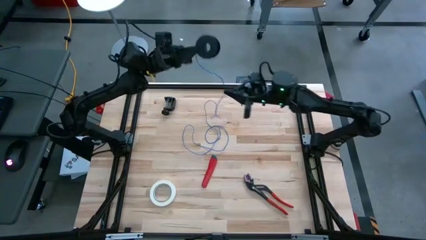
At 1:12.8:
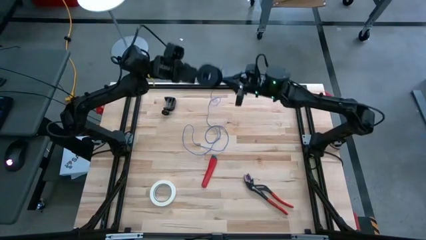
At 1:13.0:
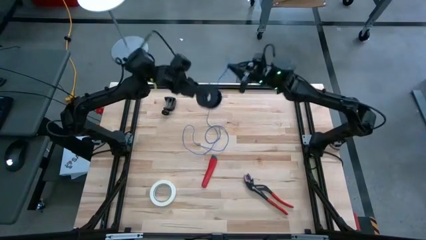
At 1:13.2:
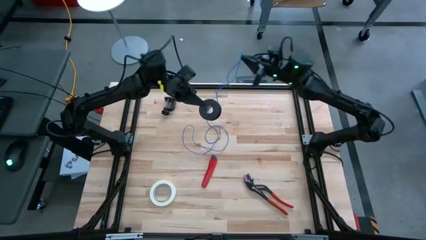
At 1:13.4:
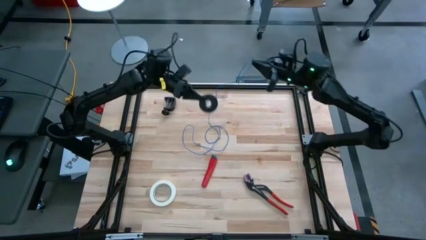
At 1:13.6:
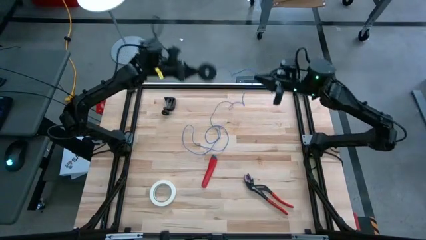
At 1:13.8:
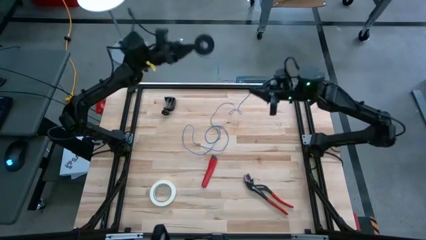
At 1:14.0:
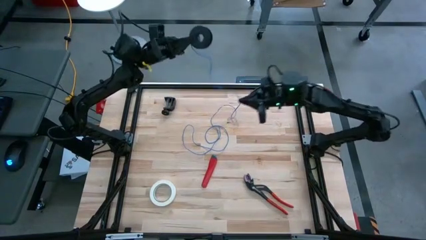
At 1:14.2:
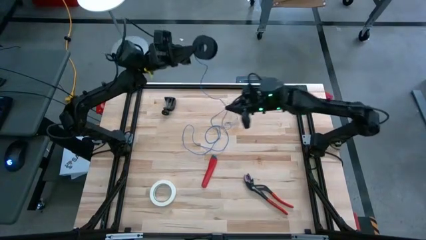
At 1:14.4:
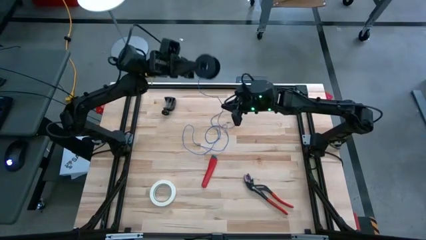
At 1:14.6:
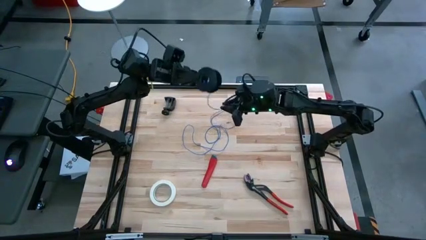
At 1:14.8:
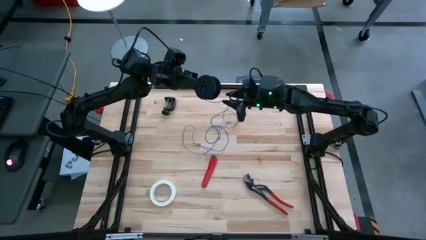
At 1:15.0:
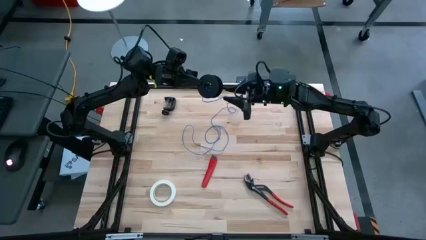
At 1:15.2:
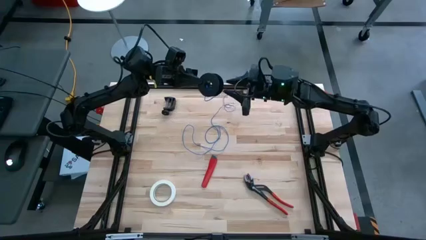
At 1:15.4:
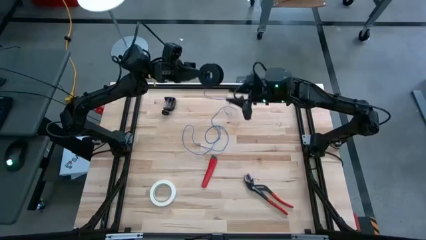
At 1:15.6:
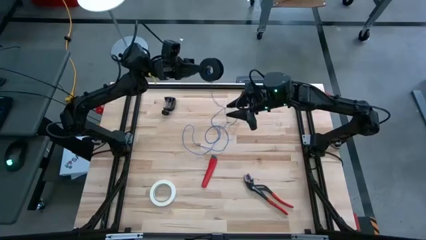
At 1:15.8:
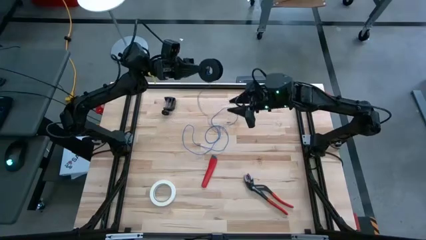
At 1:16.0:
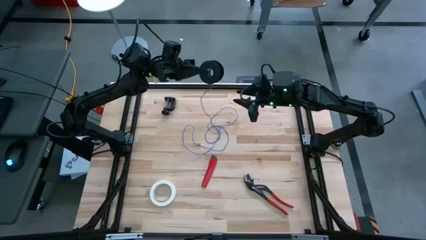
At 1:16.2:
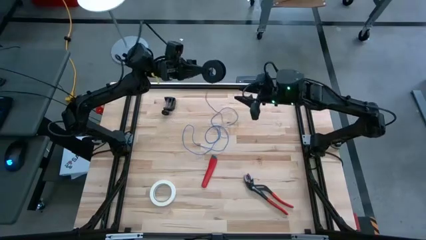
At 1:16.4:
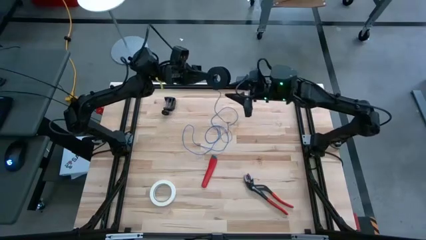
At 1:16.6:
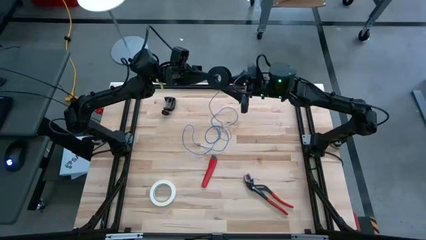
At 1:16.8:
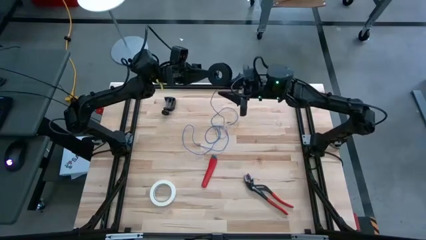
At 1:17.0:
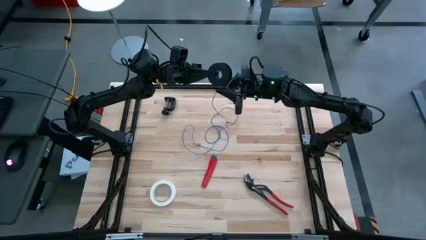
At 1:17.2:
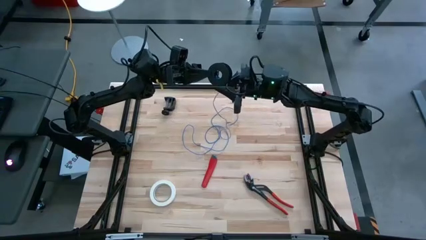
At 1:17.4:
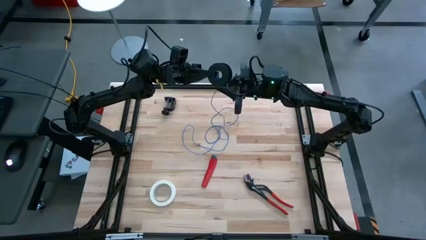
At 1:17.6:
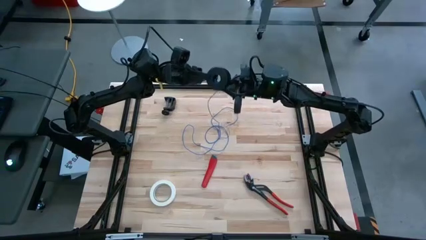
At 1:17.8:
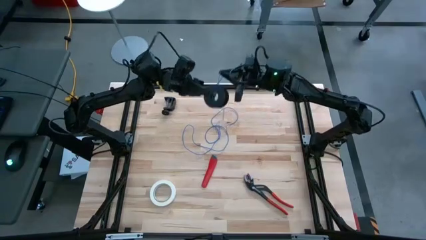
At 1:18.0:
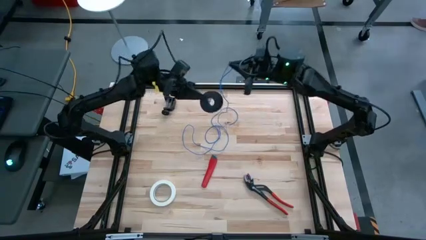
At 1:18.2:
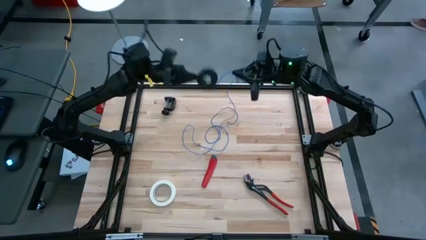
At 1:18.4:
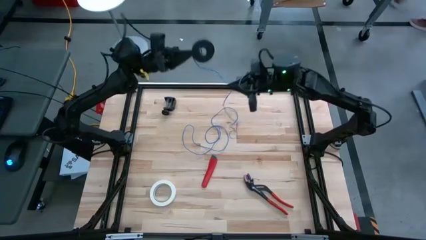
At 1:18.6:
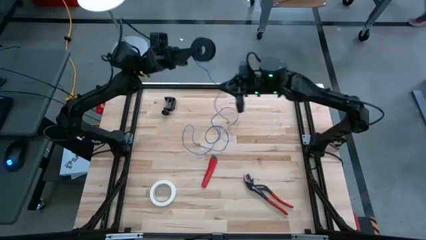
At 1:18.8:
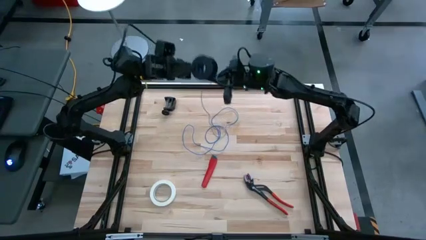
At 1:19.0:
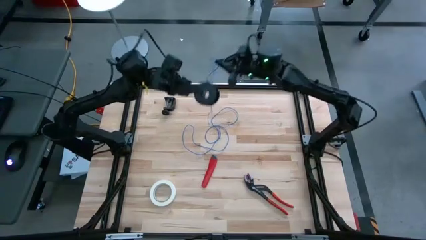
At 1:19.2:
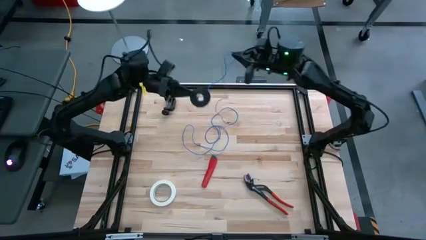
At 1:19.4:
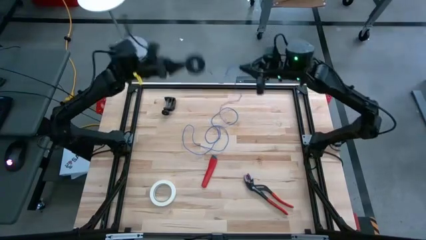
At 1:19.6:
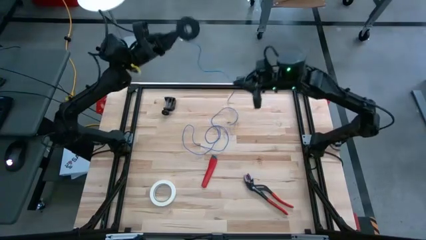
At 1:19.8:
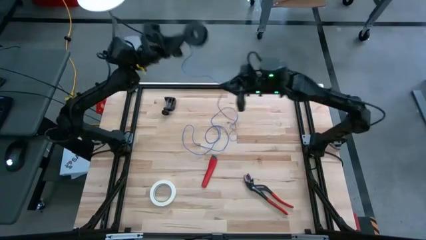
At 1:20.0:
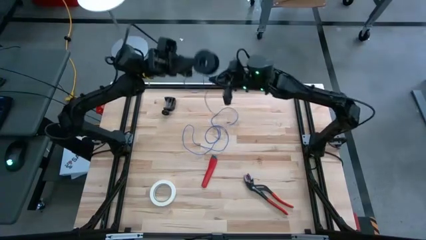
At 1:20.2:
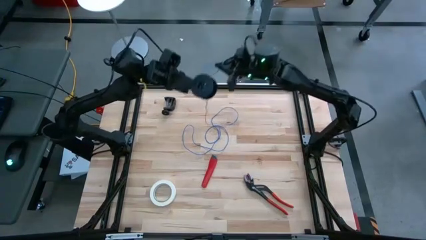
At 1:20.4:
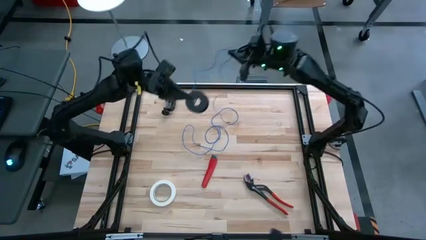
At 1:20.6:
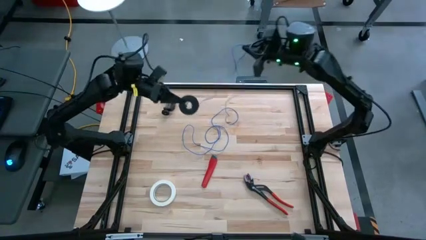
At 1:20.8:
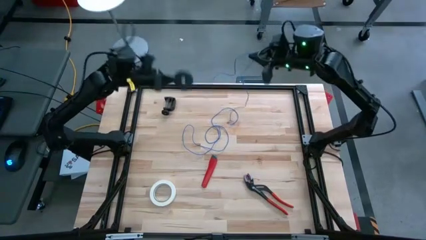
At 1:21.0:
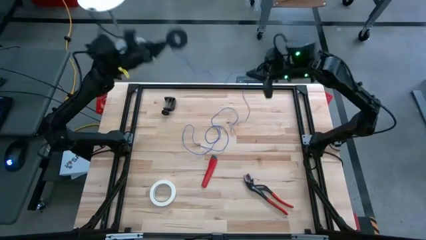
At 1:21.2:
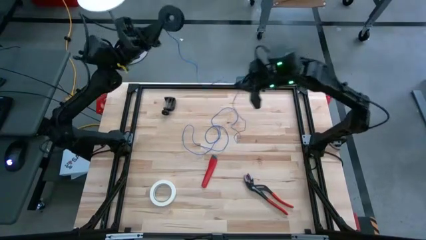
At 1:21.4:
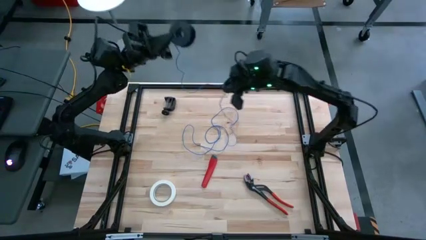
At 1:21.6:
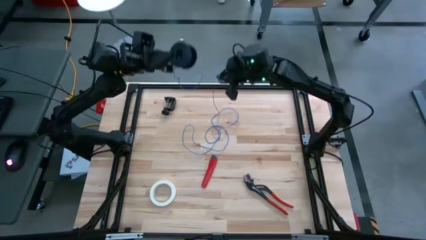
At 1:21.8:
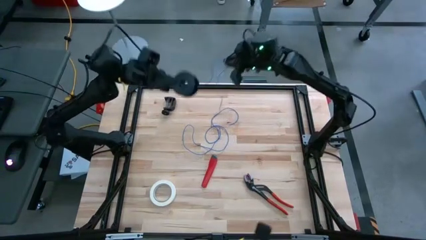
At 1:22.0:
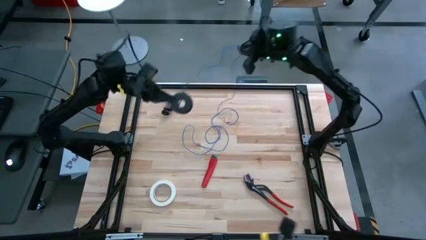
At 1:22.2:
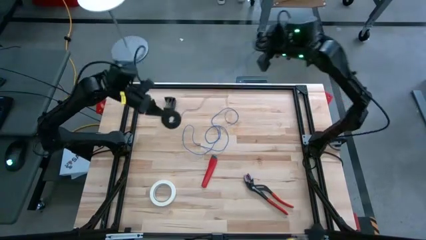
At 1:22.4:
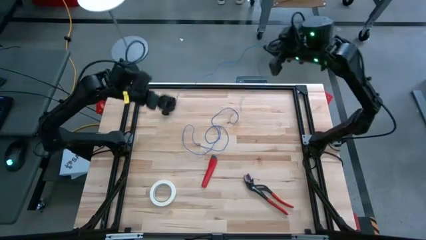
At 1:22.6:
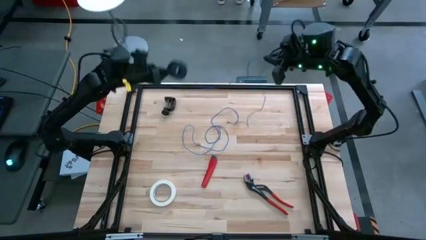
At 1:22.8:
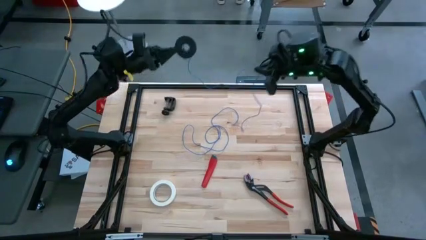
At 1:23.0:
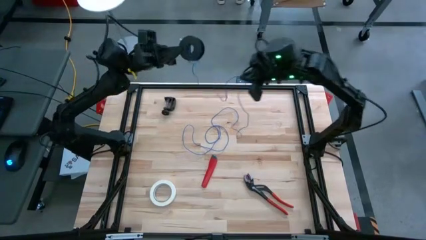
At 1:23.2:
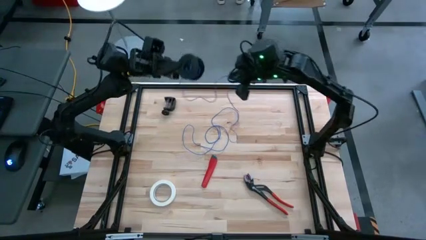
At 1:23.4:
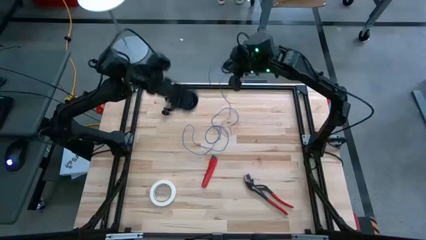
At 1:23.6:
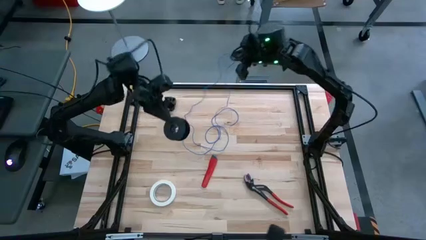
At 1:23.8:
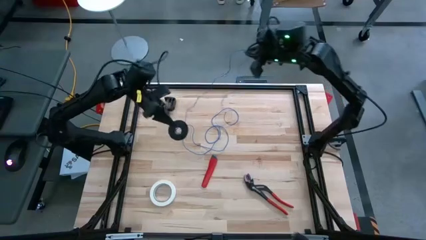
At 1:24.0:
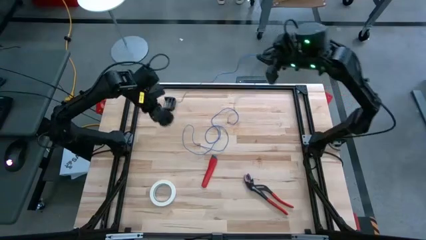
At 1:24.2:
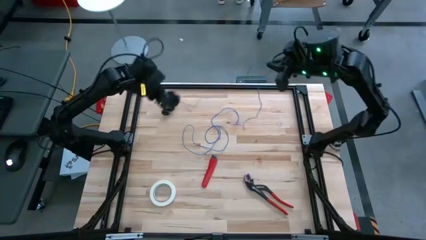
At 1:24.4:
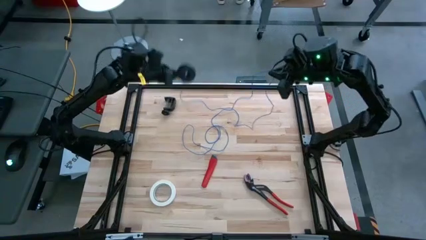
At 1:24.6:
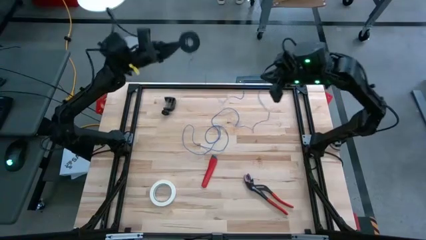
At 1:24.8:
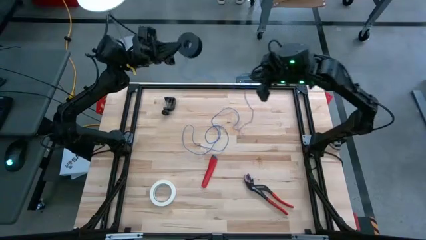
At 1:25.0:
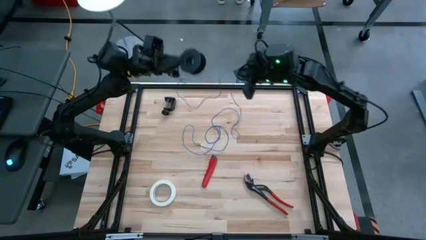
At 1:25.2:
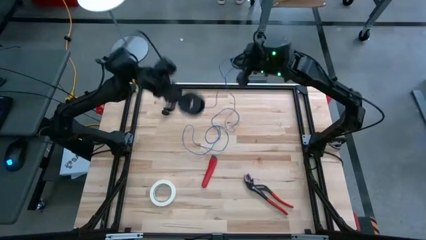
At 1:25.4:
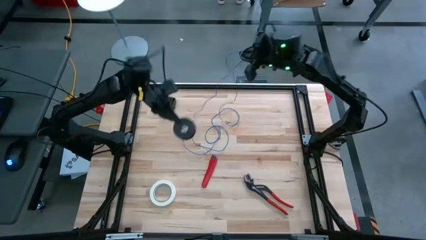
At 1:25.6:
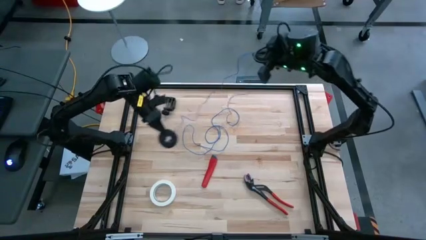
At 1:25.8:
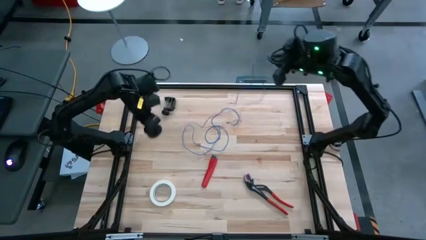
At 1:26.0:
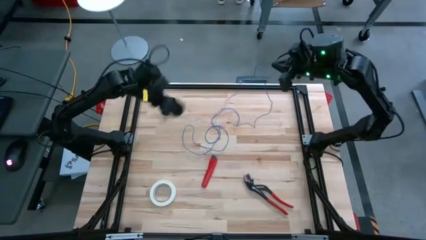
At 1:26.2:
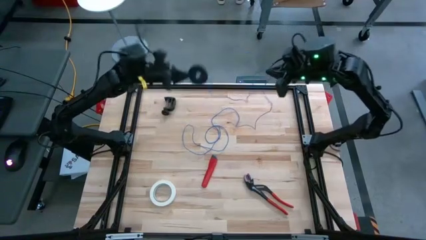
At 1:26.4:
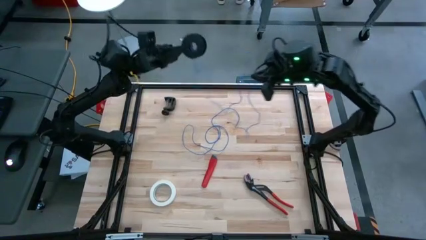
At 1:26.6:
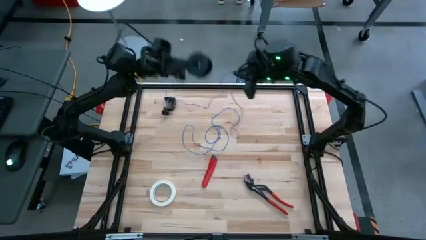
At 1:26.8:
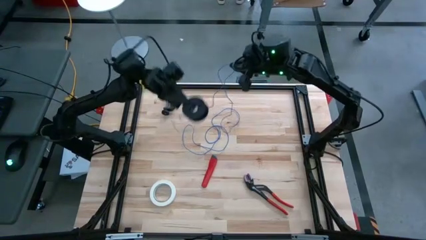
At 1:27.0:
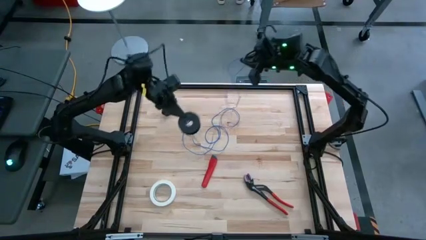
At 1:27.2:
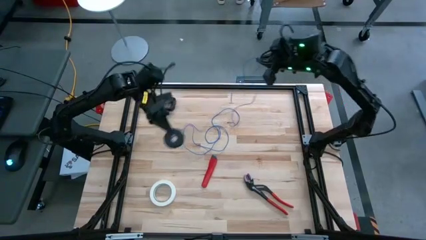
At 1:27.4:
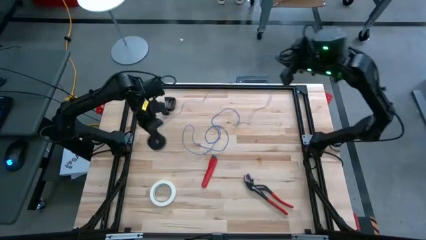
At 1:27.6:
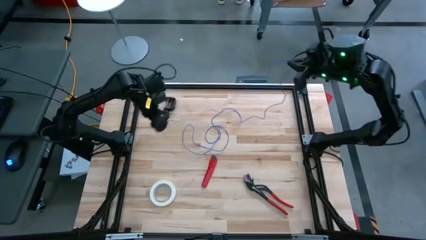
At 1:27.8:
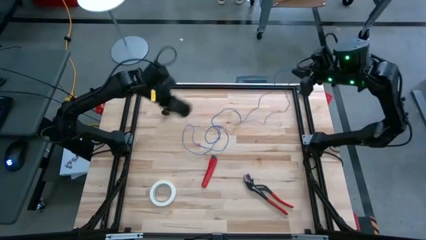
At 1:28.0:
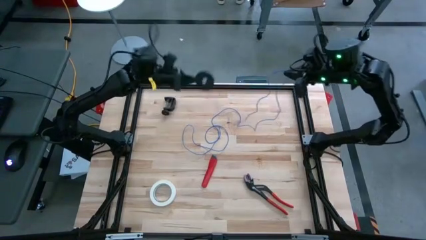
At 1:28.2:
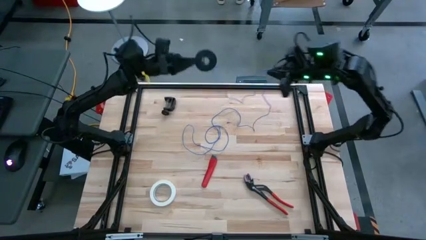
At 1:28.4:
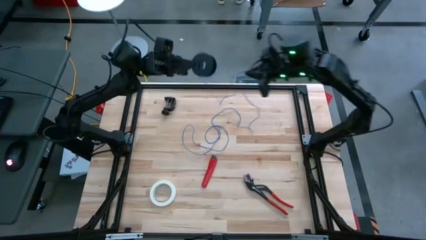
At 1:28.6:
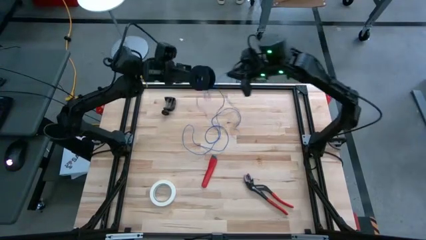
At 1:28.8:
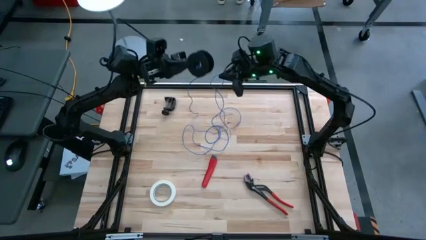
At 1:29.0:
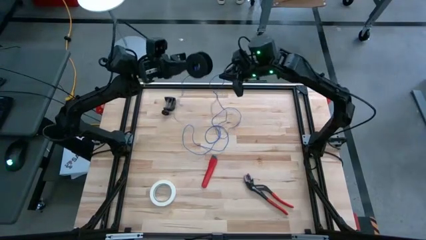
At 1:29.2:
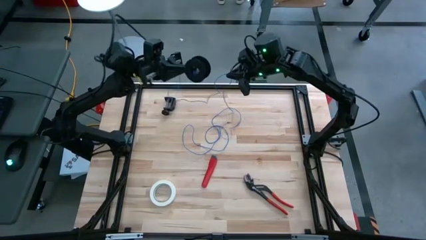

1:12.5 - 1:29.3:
Task: Coil cords
Uncoil the blue wire cable from the black spool
